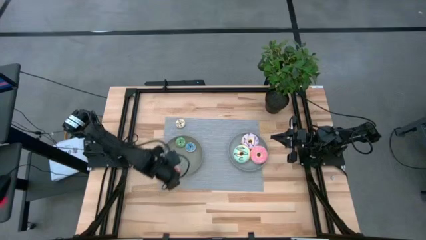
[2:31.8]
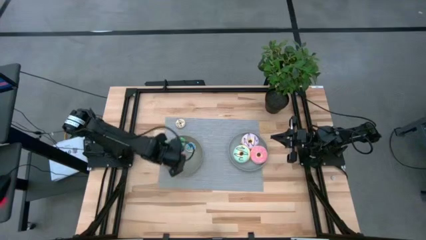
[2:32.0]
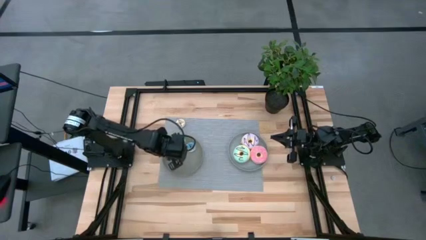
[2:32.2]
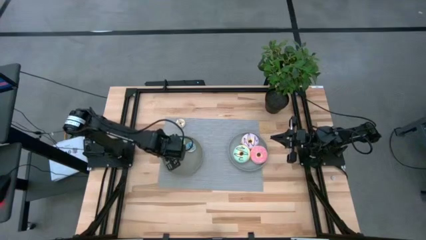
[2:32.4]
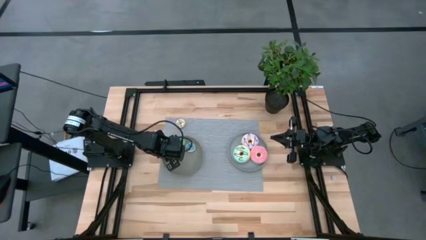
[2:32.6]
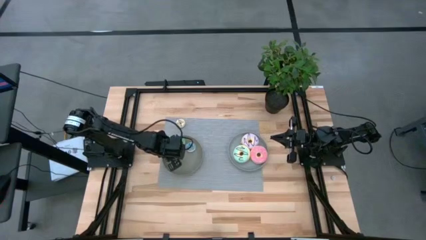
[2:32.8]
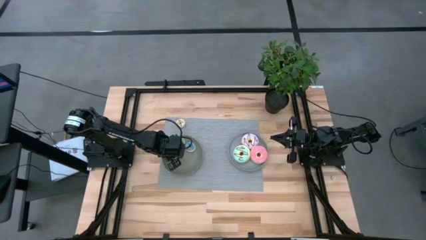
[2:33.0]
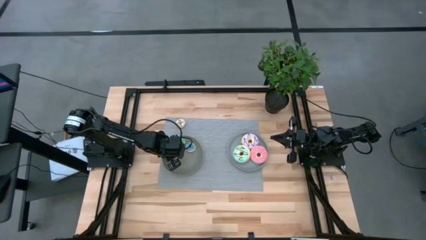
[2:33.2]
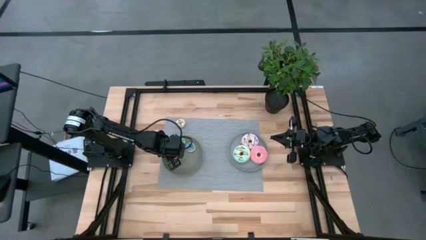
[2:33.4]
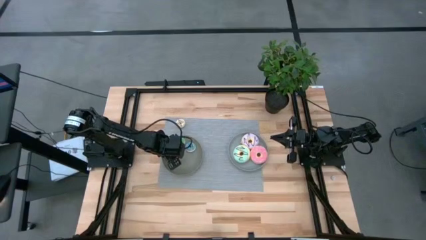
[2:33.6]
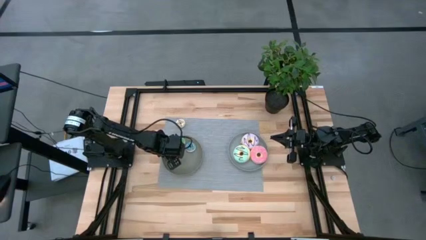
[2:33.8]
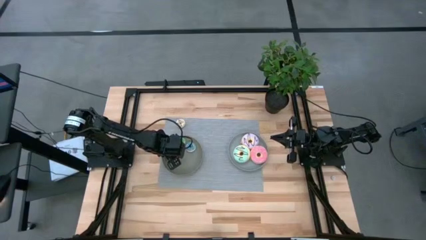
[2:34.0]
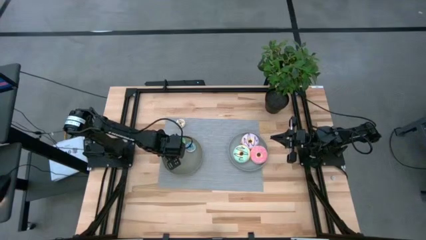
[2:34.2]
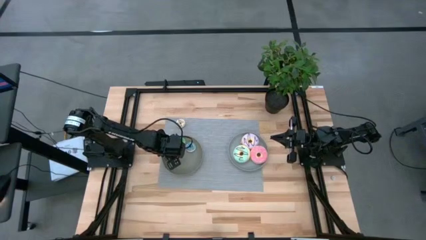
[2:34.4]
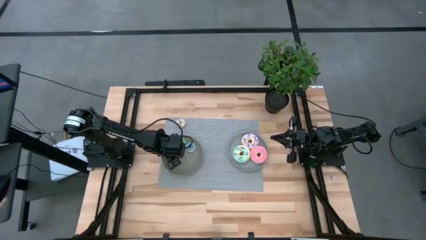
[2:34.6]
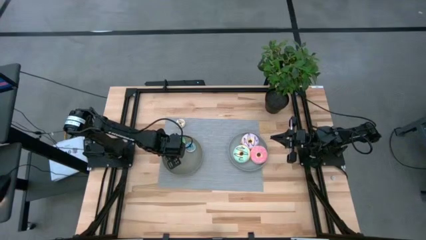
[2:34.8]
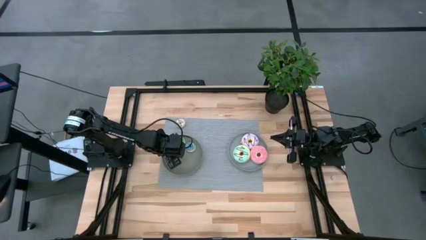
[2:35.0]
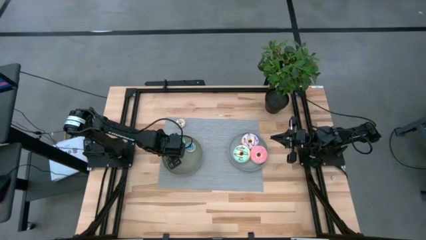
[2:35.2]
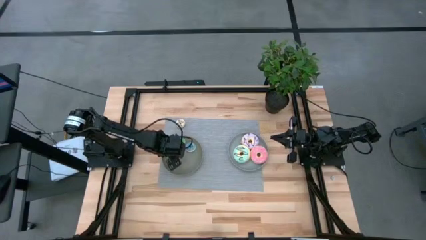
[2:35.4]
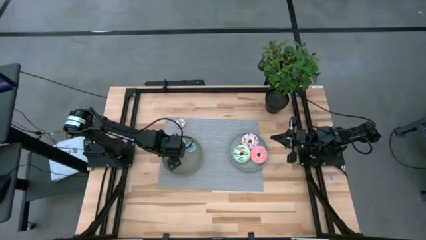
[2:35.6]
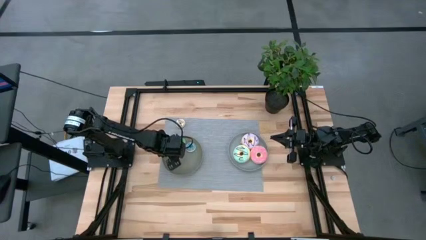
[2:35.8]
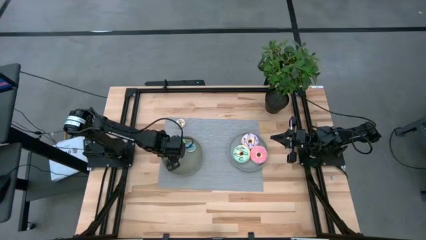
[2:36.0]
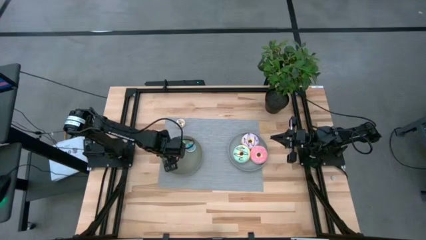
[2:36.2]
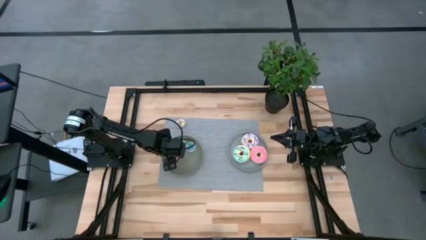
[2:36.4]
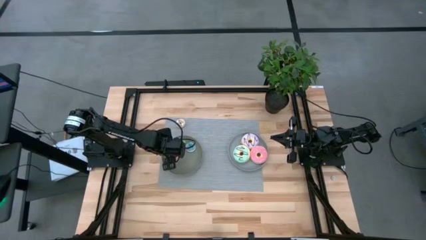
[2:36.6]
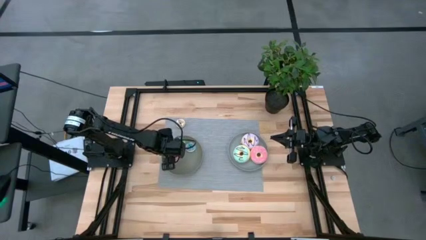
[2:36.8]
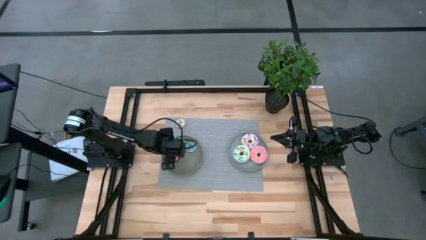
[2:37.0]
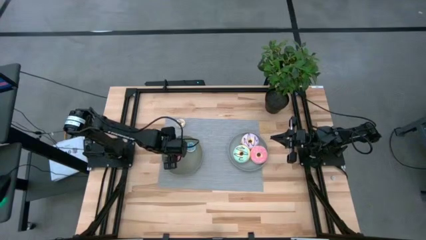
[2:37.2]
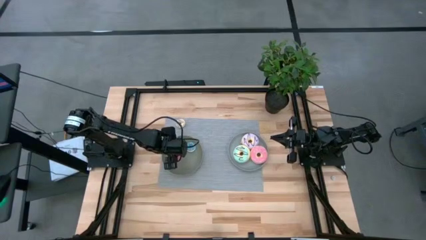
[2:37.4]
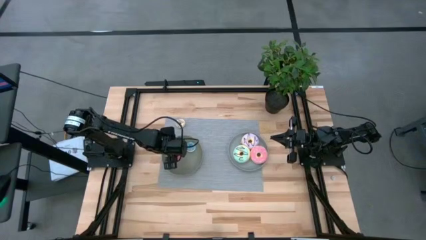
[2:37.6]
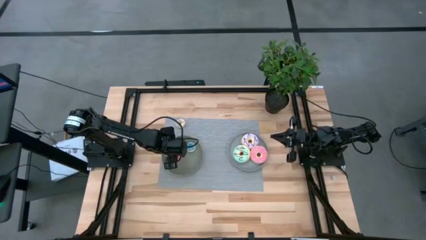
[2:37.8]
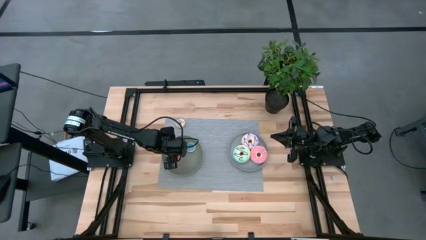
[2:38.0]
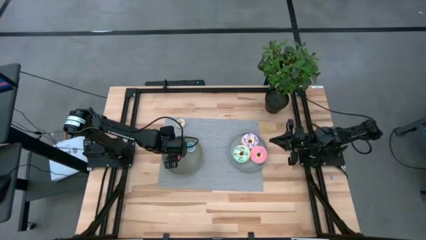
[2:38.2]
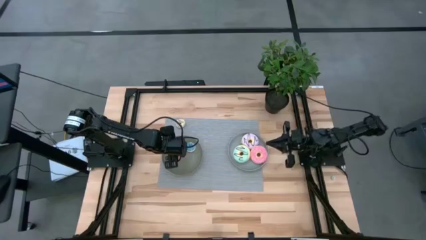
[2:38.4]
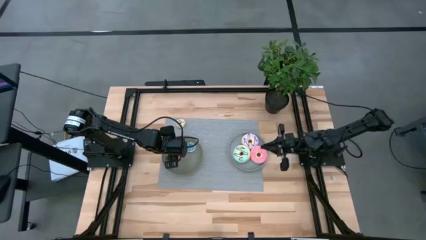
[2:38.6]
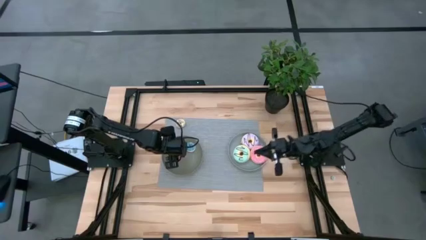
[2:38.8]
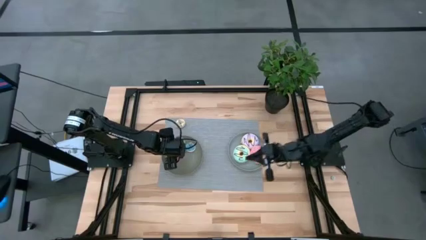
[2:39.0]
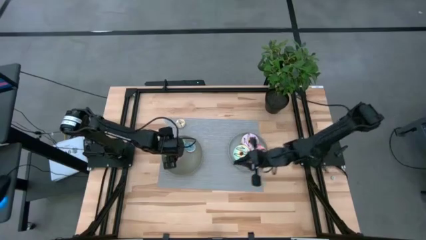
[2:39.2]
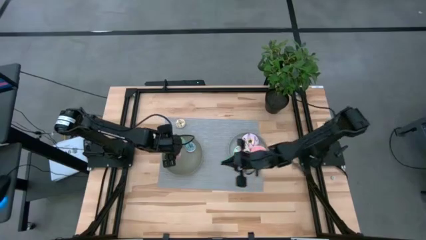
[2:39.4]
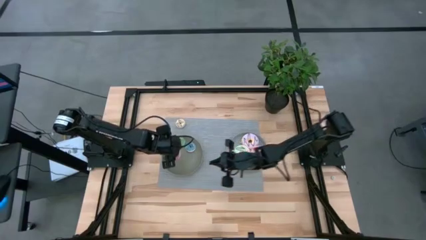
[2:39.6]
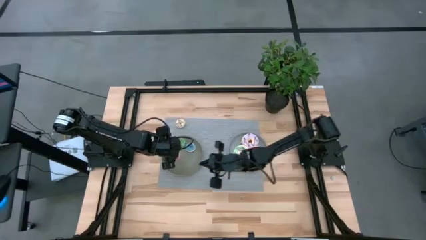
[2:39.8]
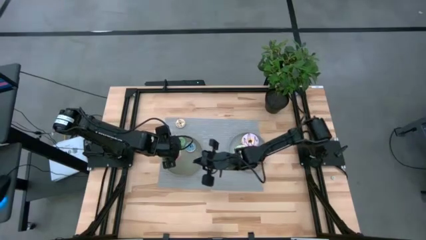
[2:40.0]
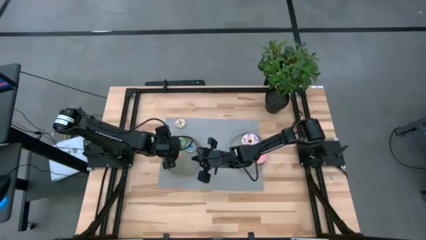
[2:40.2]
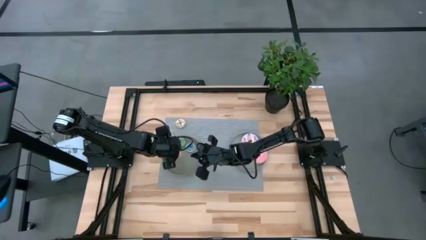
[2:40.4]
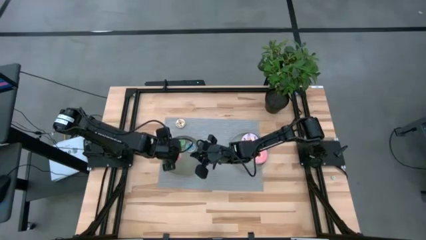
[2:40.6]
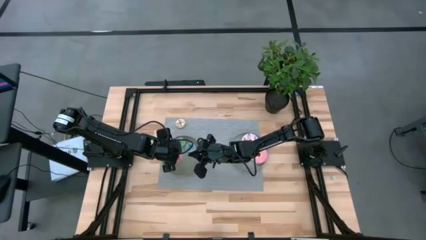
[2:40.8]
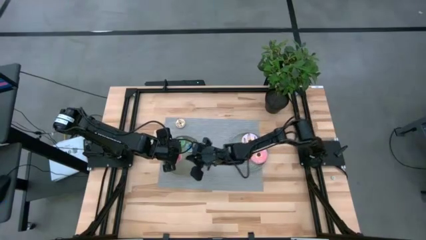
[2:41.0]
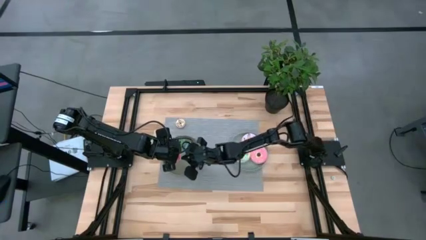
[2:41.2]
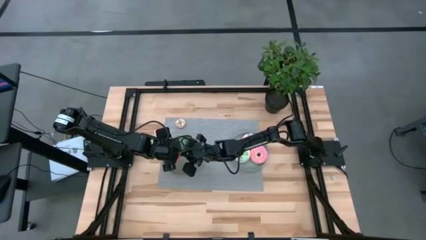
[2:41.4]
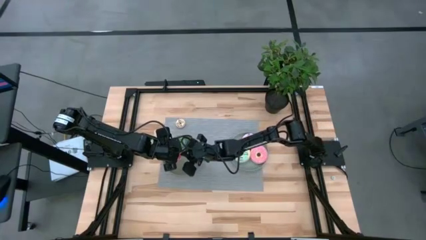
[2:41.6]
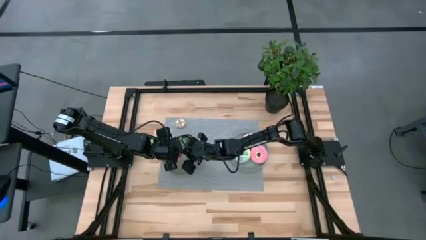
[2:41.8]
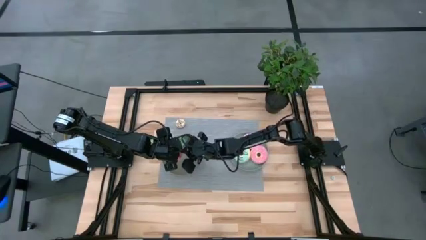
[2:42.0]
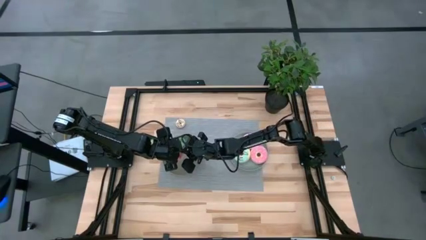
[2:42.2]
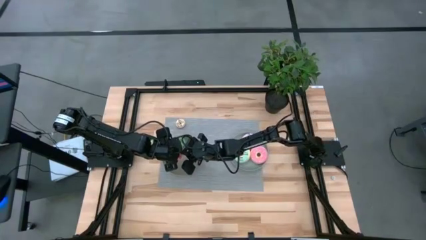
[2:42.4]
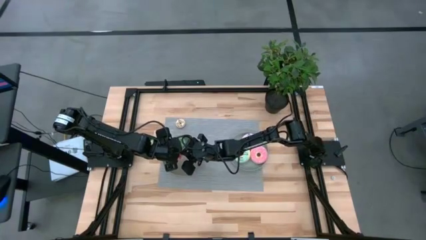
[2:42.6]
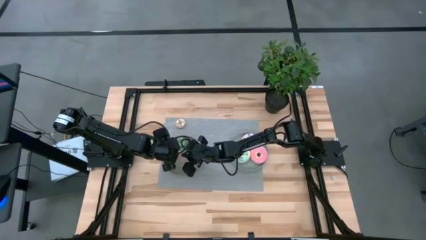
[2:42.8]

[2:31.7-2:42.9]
Task: Pick & Place donuts
Put the small pink donut into the green plate

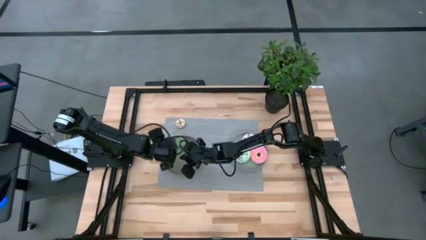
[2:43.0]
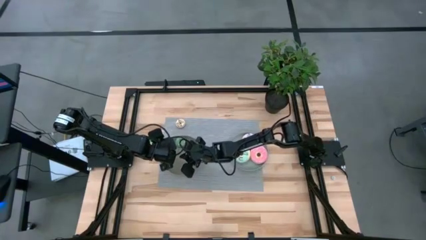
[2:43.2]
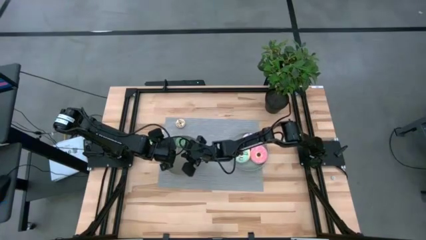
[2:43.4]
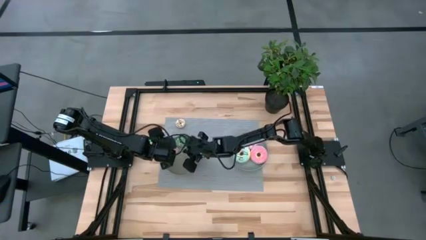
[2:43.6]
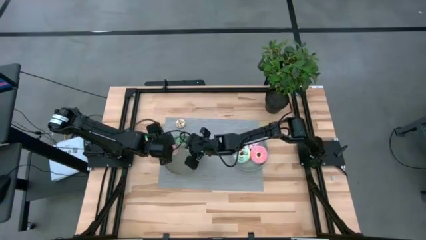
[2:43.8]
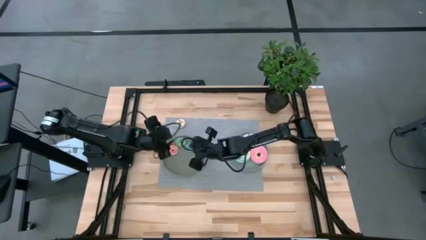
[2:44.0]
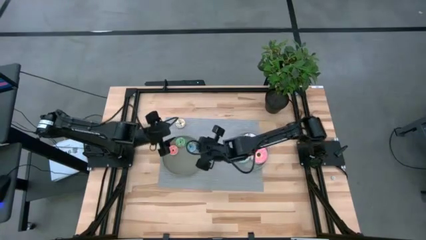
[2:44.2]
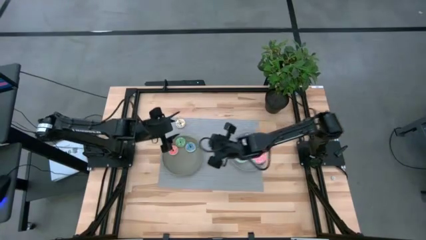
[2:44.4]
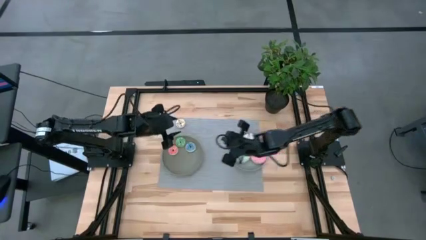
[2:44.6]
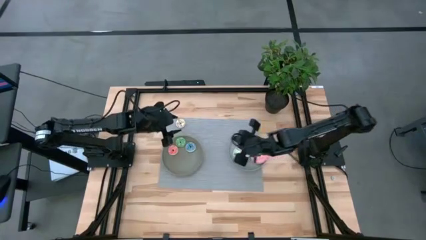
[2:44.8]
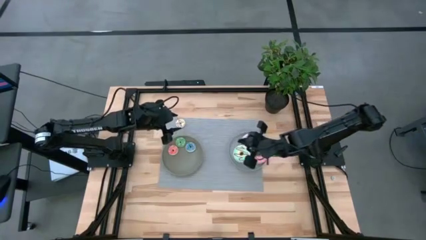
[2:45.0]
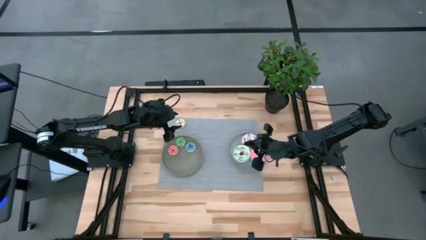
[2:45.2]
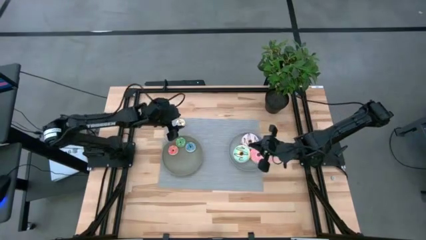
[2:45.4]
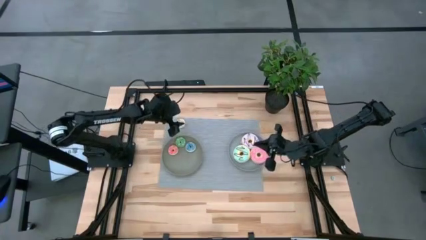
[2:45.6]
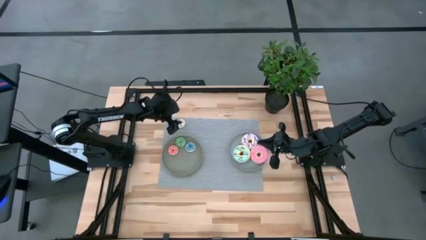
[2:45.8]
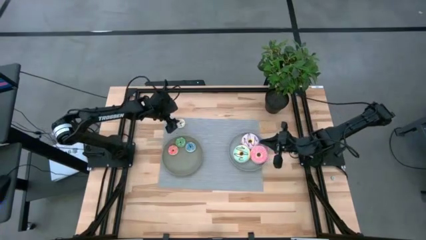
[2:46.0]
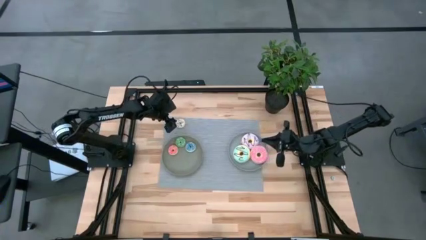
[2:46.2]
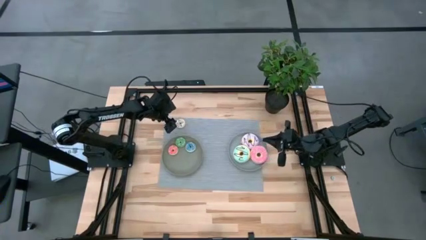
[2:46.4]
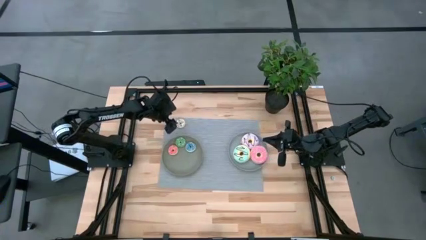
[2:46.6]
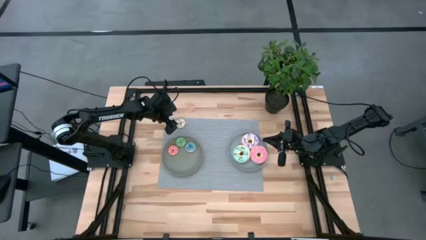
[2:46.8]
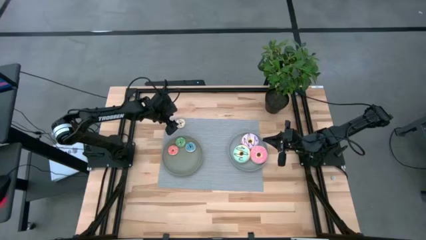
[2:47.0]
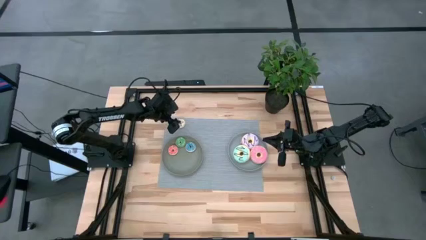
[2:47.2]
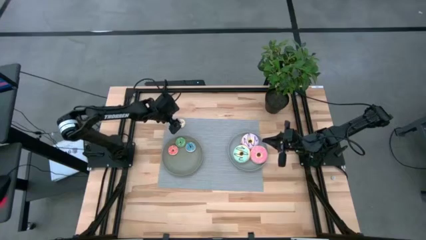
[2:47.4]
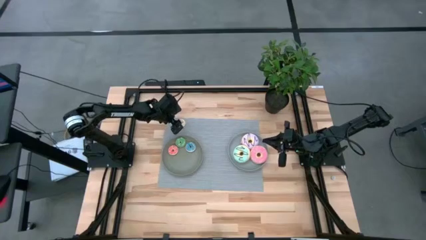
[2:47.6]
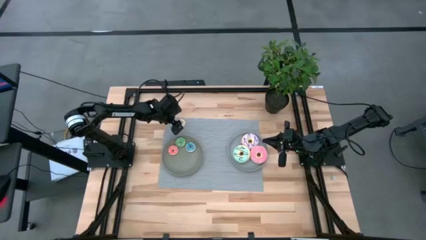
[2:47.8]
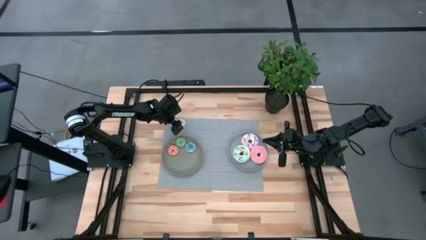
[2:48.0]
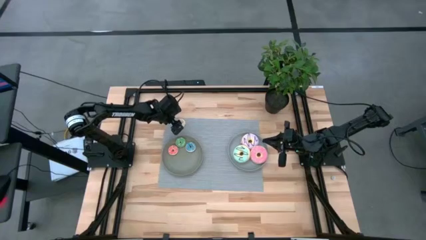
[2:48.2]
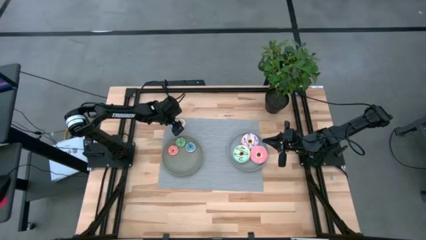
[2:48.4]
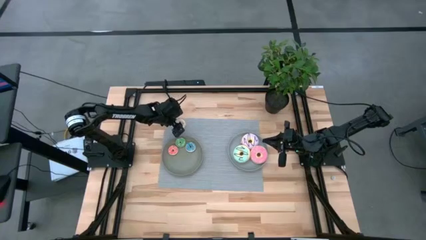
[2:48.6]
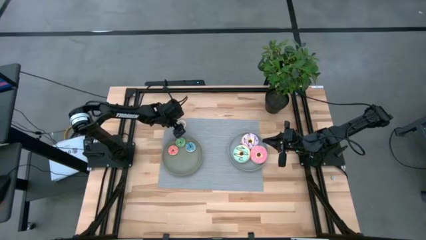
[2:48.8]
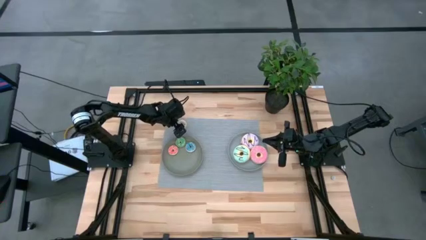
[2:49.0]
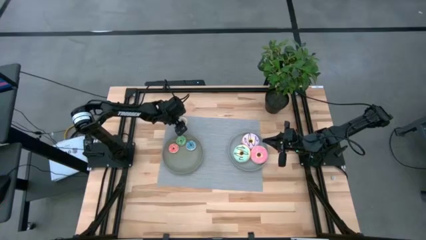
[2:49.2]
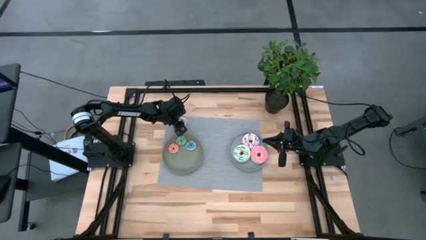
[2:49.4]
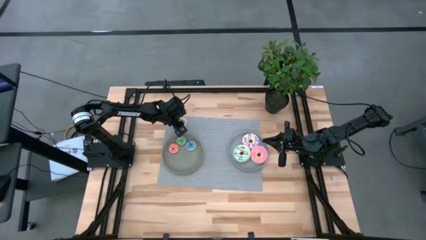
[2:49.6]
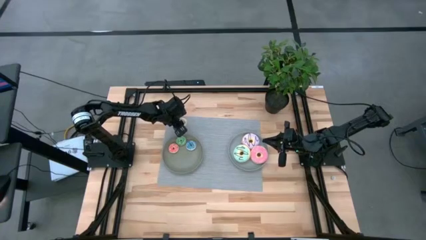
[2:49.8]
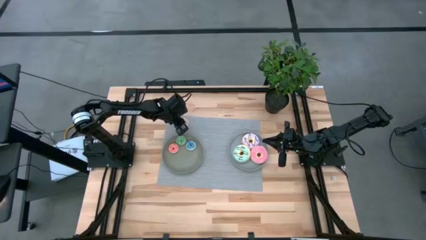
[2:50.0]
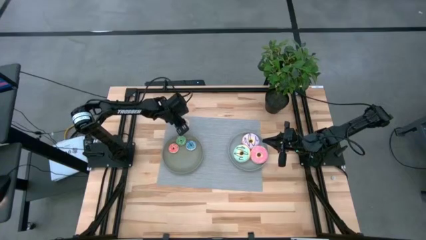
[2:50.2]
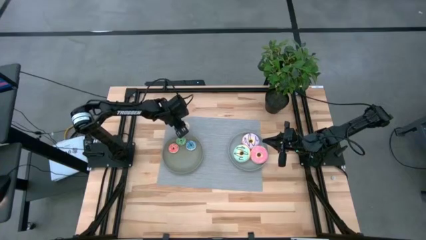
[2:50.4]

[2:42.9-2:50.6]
Put the small white donut into the green plate
